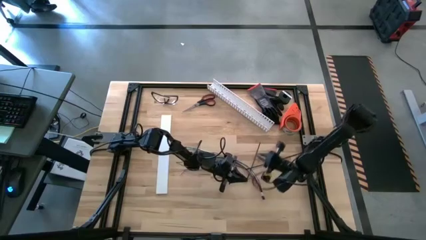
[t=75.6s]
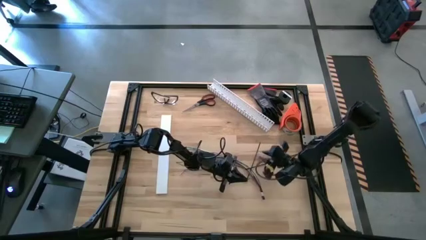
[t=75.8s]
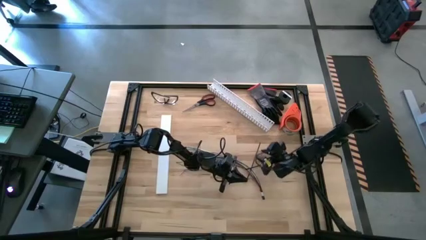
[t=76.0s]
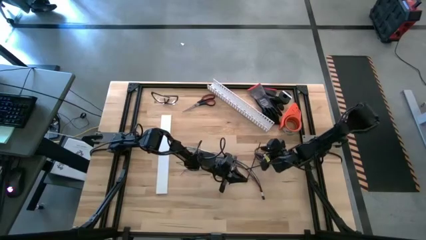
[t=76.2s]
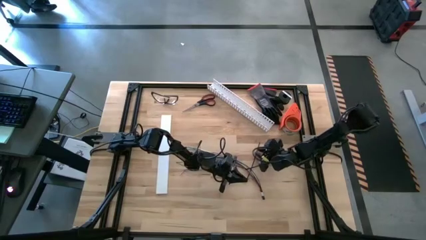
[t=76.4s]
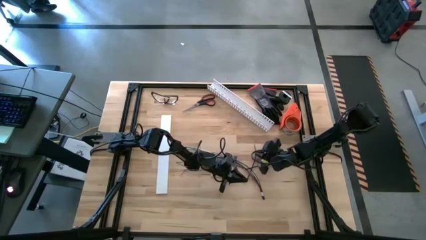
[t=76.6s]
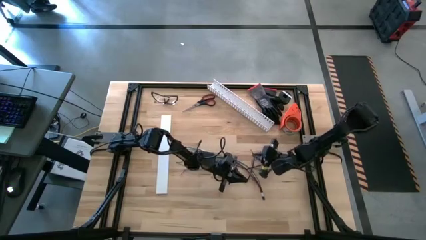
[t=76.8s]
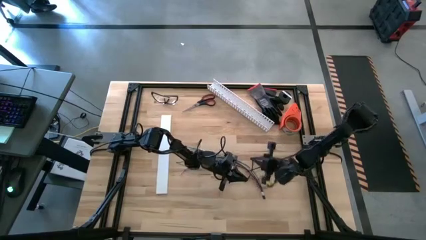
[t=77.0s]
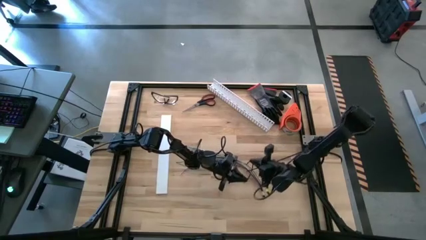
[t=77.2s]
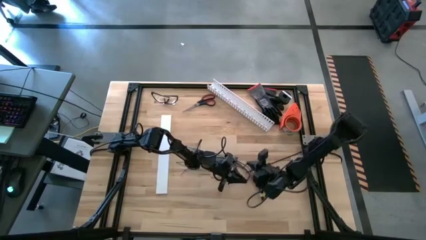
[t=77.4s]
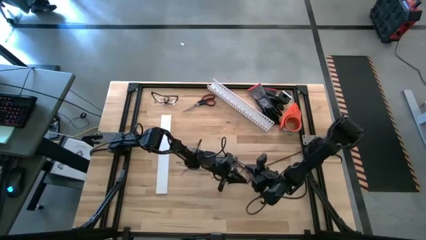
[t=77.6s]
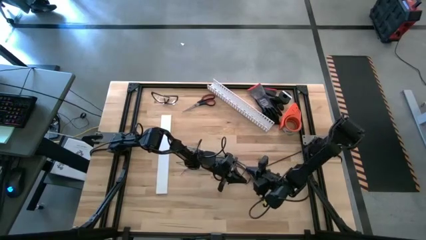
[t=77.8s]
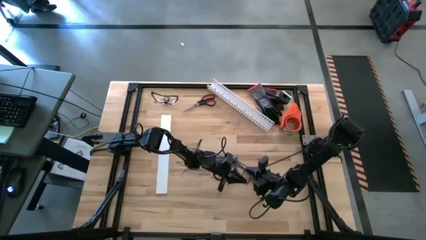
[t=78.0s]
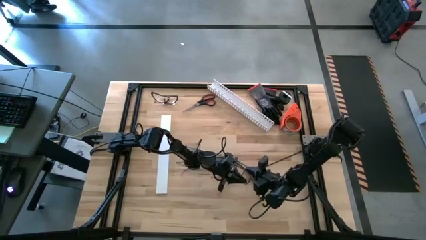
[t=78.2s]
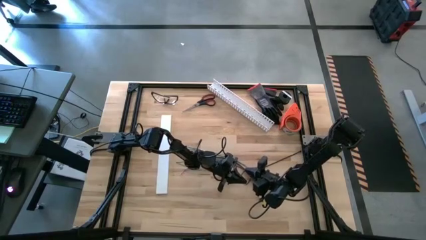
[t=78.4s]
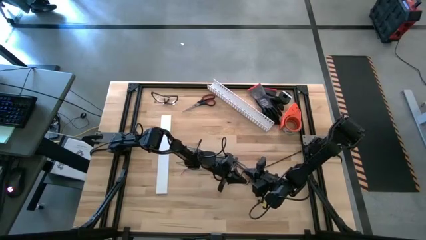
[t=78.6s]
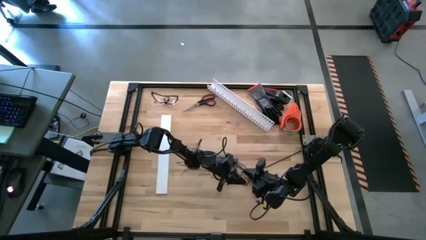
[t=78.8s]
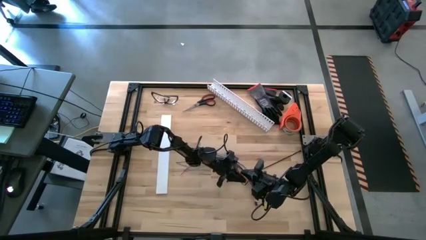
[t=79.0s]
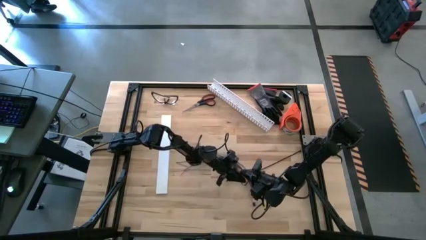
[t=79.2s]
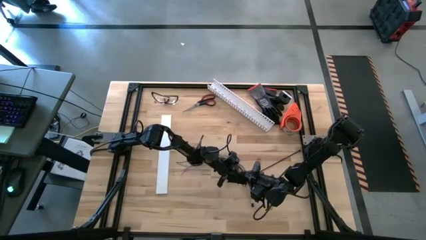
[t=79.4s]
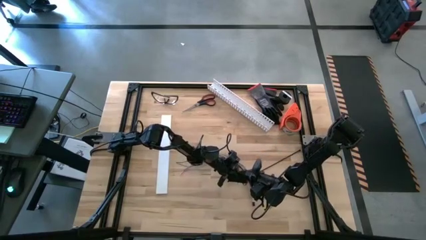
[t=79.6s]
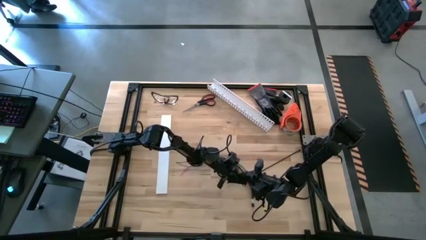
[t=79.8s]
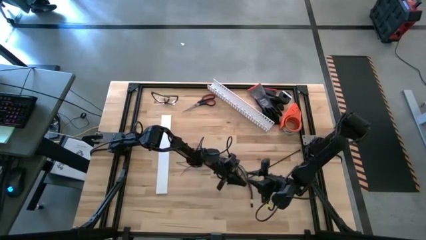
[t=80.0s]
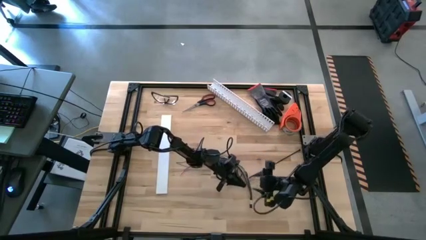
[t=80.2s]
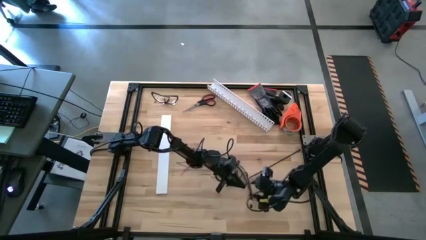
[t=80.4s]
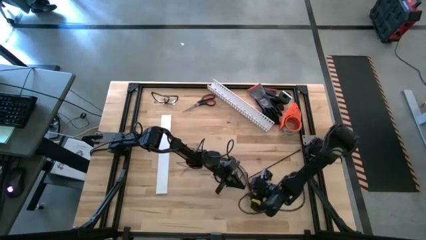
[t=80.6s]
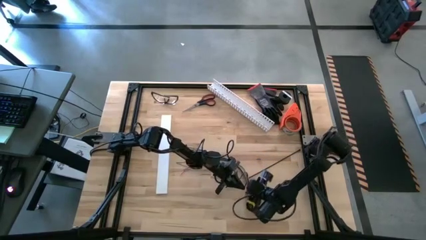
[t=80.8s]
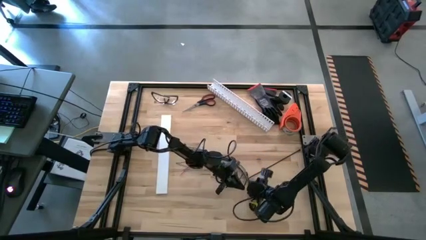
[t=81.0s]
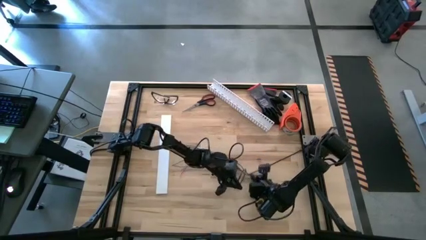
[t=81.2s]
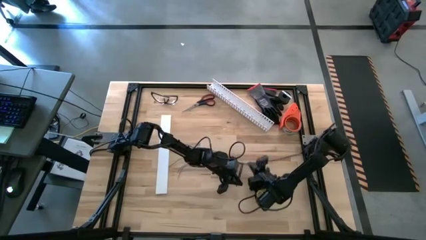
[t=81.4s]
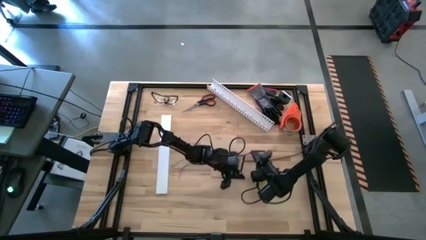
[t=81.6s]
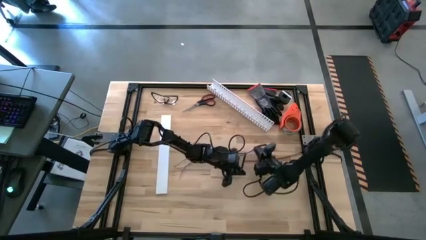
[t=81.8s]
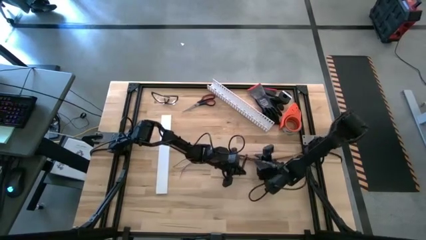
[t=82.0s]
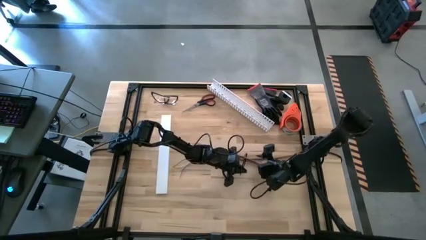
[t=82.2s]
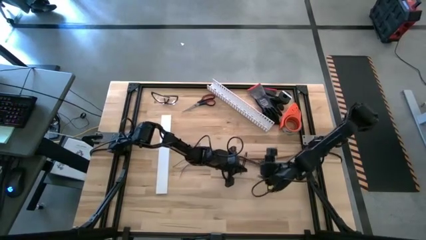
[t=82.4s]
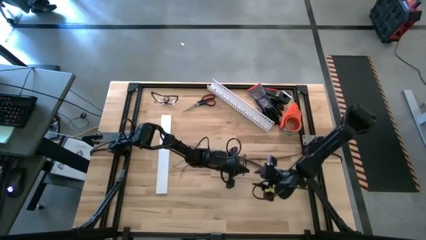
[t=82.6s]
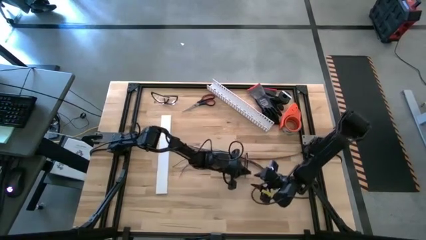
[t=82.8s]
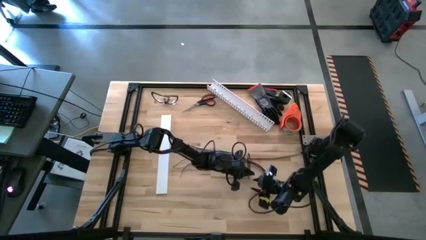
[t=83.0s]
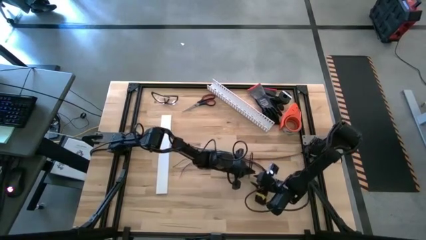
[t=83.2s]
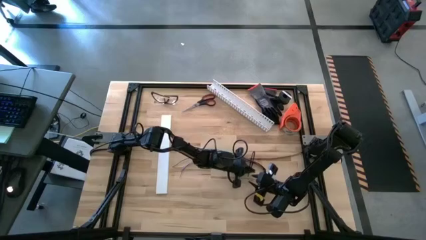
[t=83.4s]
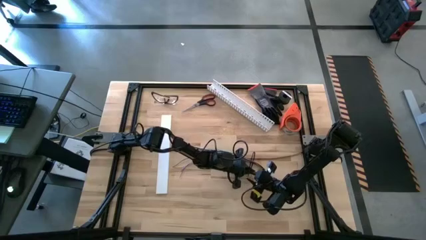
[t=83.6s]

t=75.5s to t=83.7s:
Task: Ziptie cables
Wrap the bottom black zip tie on the cable wires

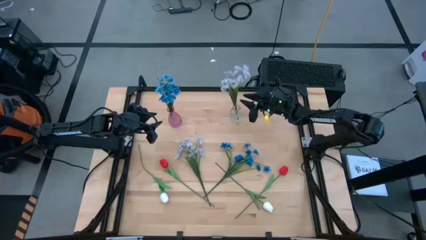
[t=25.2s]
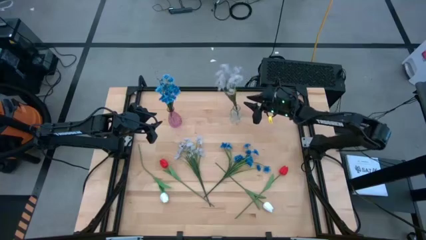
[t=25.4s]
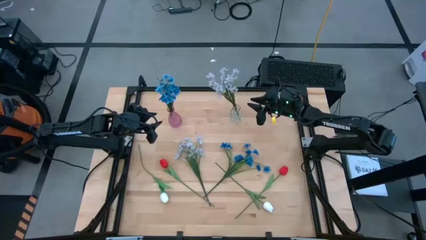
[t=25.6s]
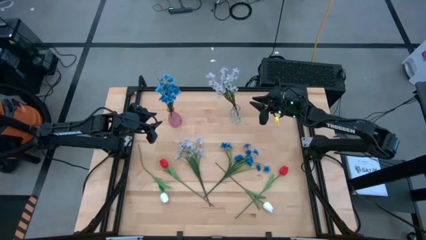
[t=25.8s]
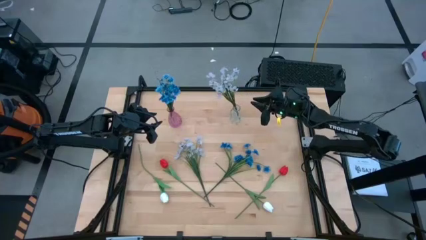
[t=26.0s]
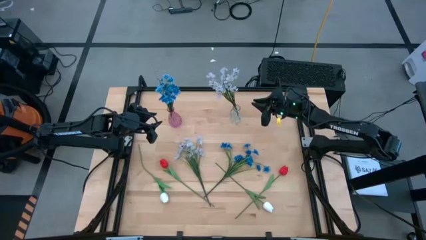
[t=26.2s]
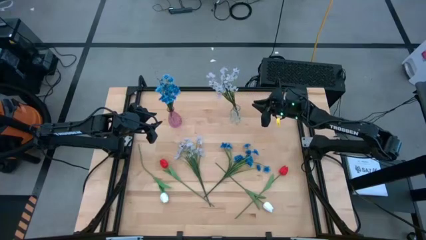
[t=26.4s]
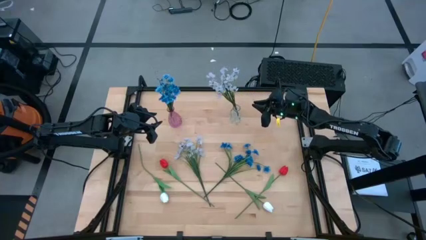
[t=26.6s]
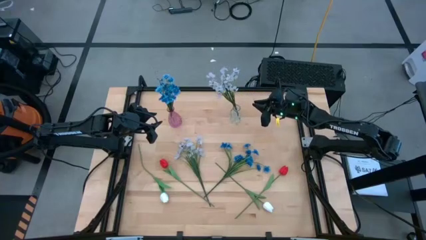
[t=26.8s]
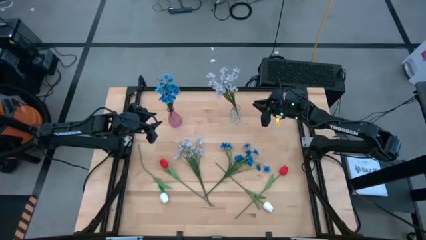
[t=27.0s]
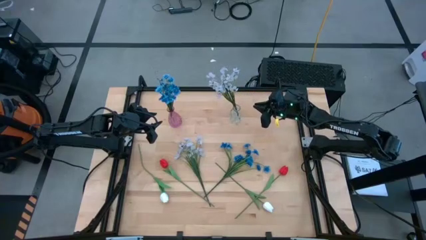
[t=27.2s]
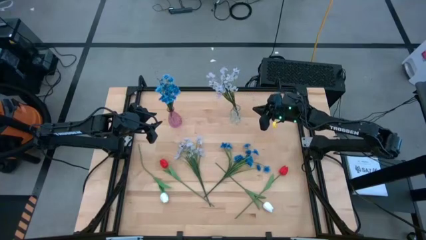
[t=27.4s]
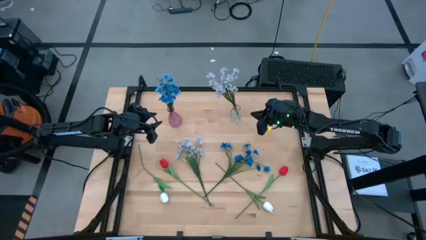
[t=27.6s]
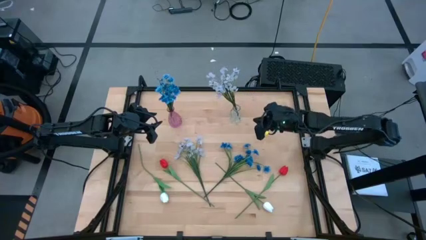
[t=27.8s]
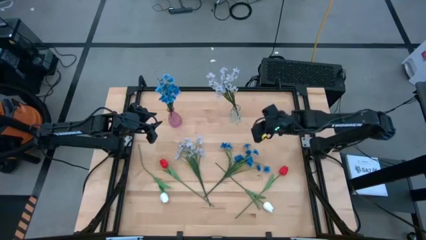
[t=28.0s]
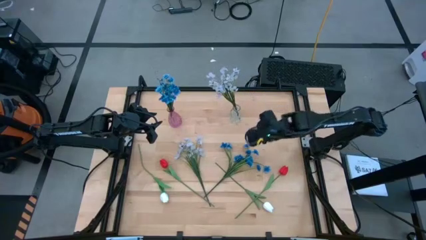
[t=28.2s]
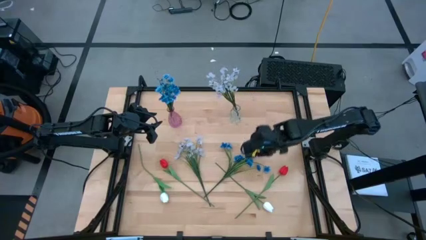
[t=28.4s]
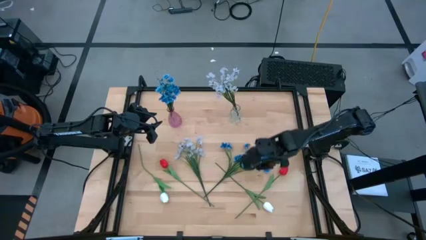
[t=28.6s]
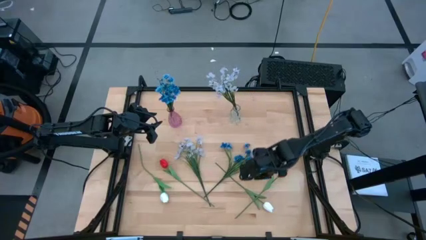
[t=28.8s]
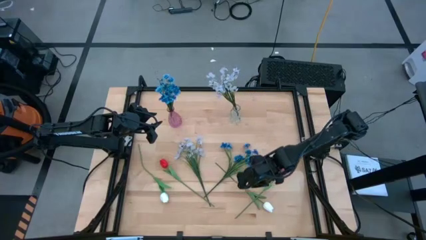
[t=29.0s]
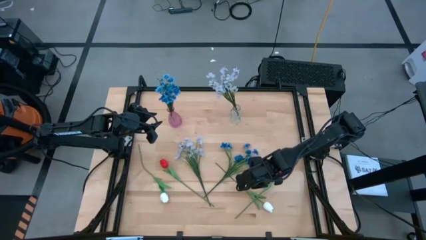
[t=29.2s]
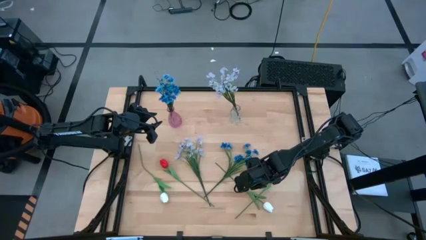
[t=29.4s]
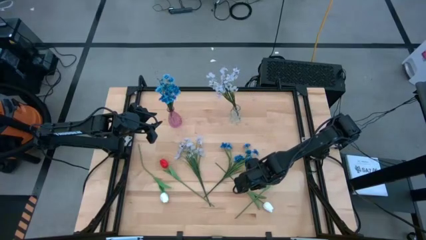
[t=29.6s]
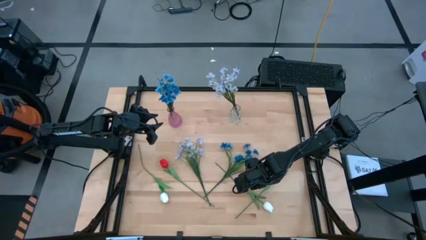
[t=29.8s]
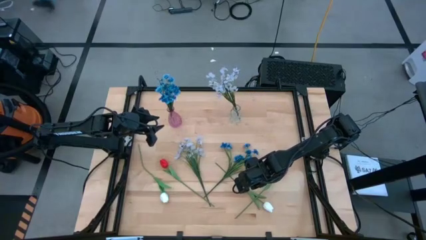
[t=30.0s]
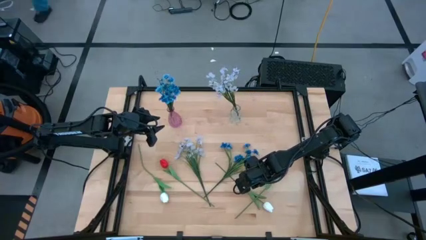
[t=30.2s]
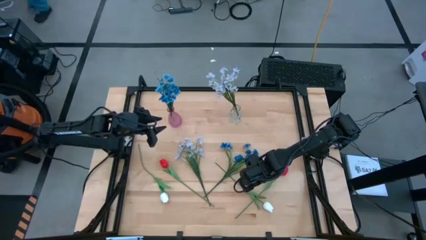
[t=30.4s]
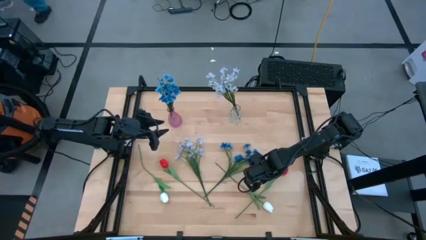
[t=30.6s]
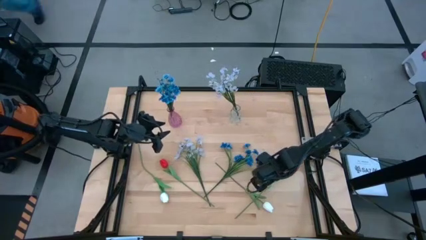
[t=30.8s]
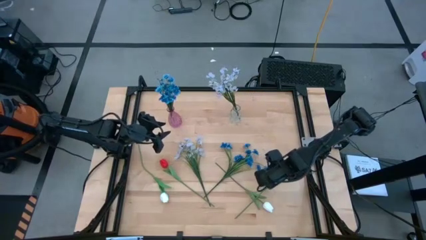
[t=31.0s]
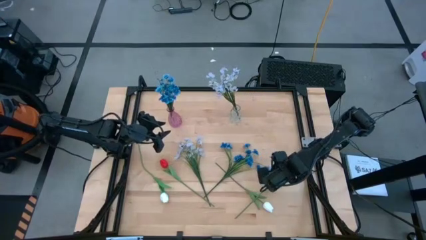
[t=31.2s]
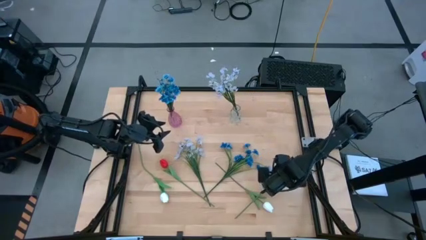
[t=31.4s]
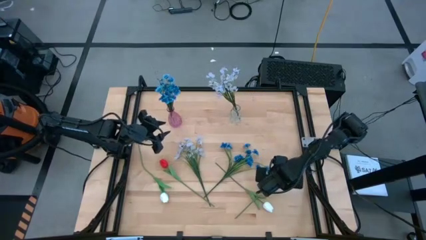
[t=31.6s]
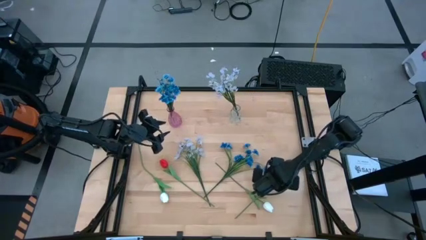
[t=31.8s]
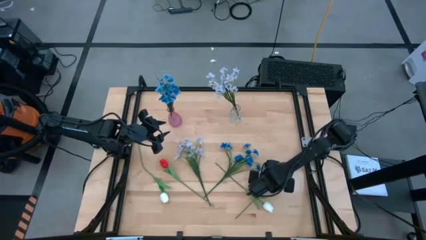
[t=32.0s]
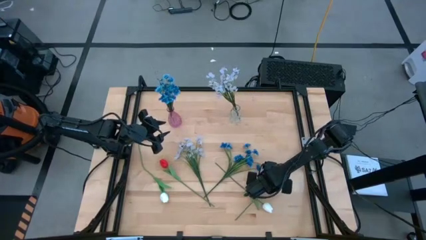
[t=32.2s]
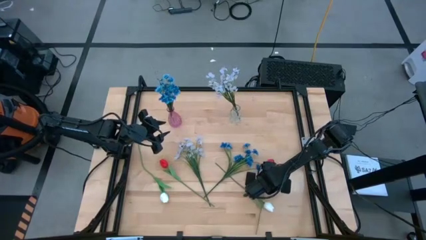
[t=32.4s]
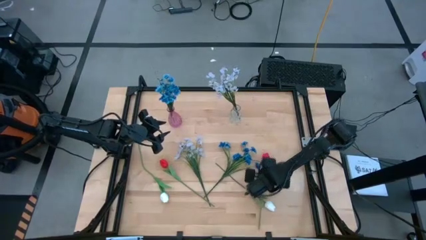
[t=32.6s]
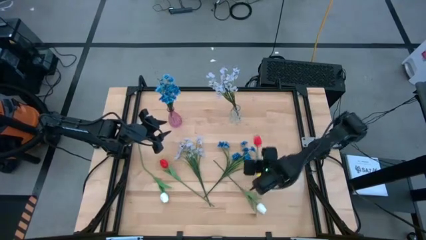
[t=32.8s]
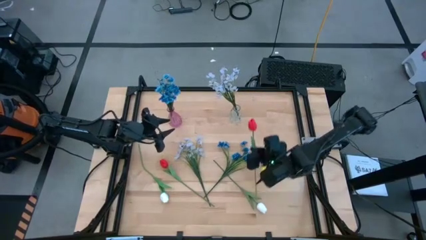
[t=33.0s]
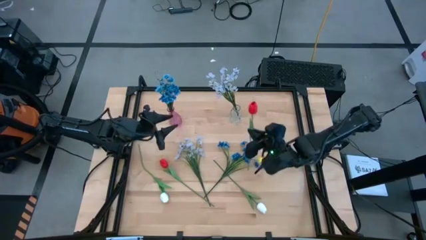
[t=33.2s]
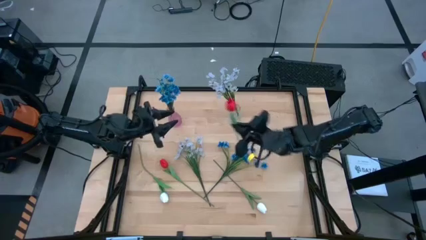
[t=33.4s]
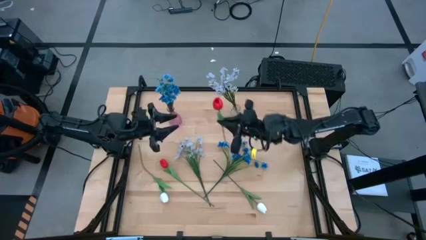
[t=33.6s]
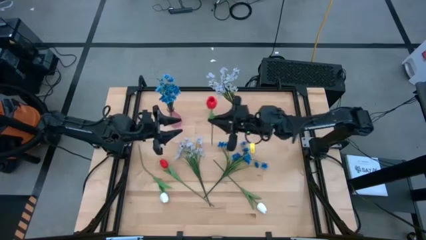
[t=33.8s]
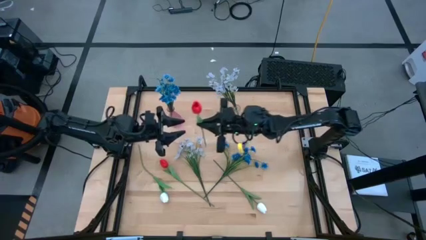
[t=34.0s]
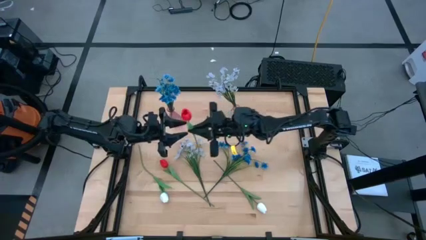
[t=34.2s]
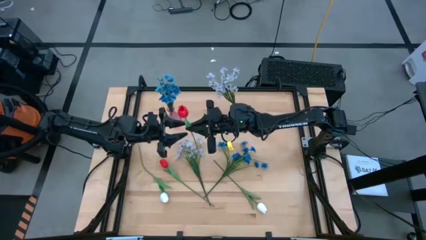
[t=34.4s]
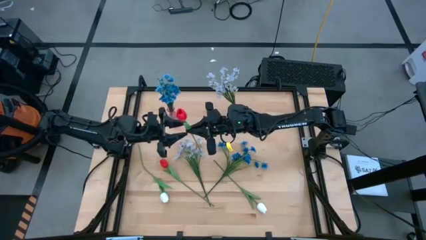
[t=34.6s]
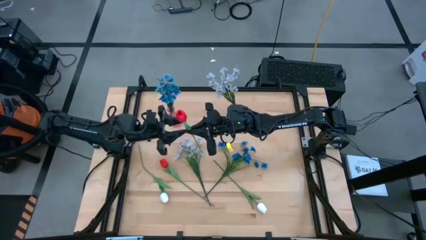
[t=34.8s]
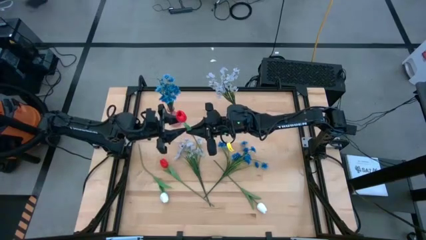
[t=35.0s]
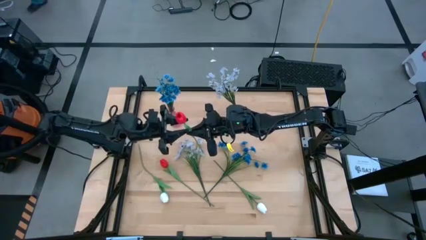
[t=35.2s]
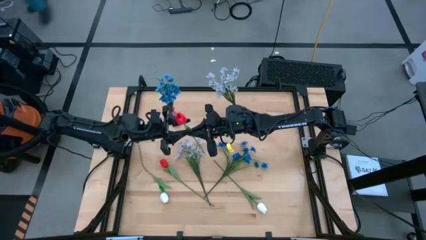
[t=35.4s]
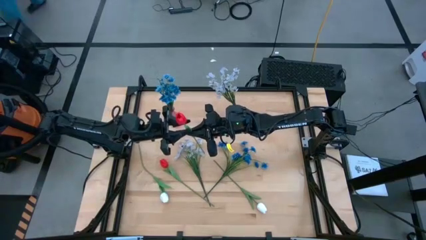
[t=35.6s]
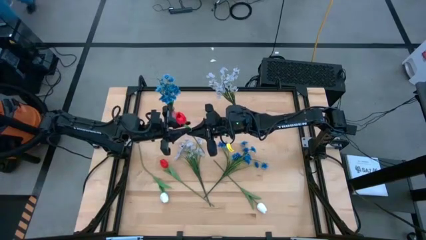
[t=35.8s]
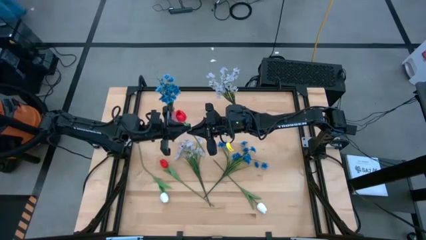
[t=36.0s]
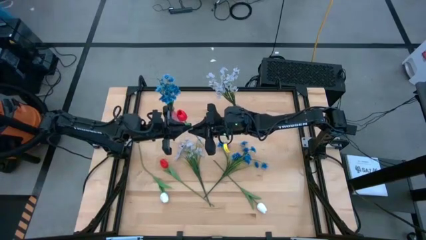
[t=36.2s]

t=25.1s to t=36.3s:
Task: Sort flowers into vase by color
Put the right red tulip into the pink vase
